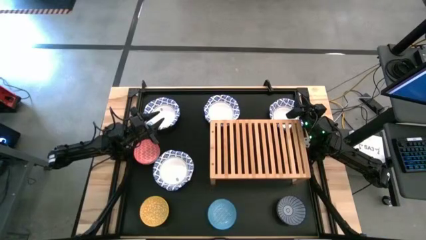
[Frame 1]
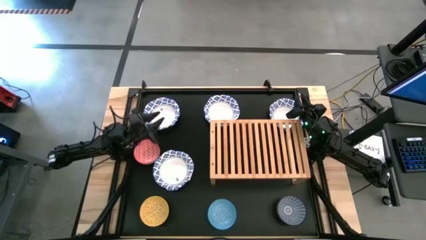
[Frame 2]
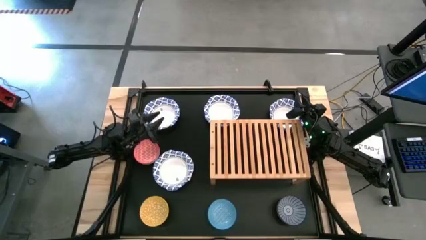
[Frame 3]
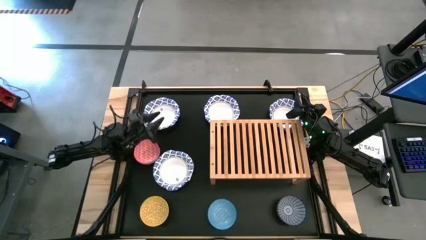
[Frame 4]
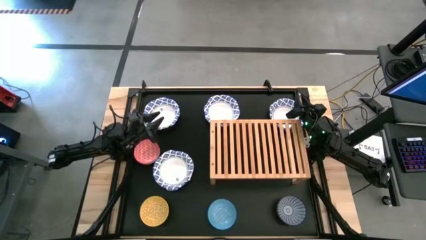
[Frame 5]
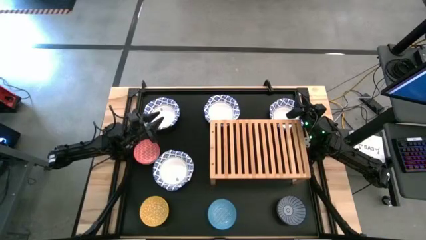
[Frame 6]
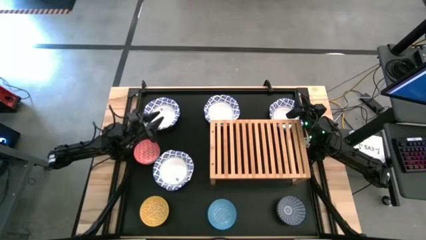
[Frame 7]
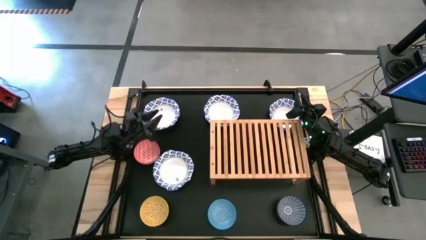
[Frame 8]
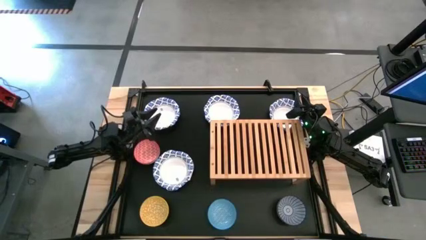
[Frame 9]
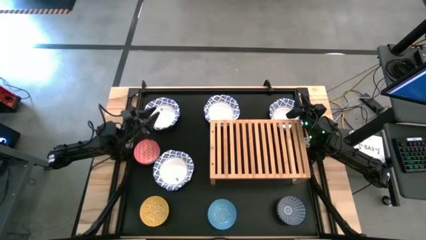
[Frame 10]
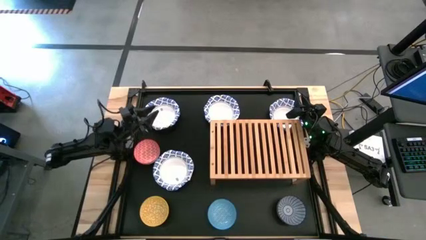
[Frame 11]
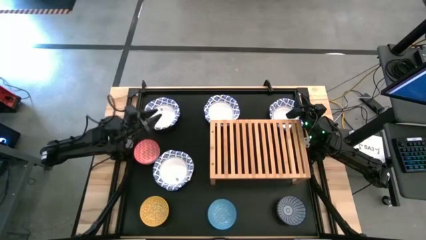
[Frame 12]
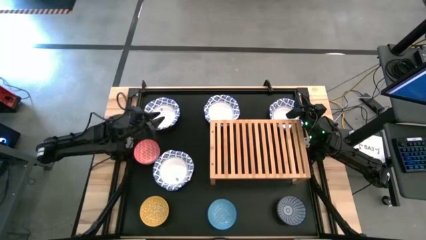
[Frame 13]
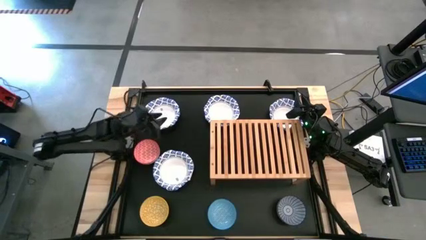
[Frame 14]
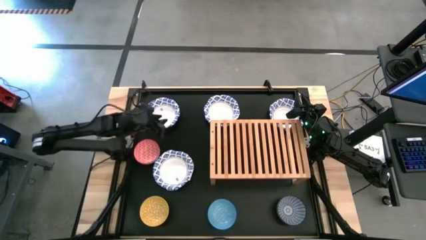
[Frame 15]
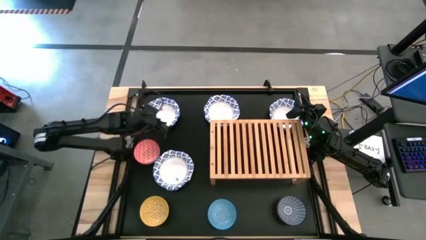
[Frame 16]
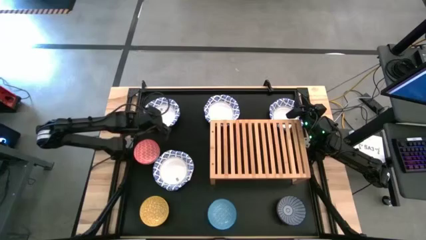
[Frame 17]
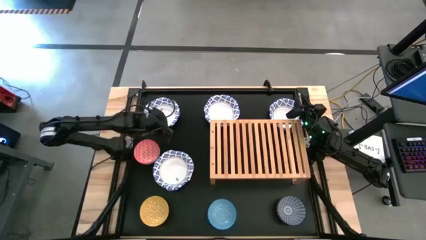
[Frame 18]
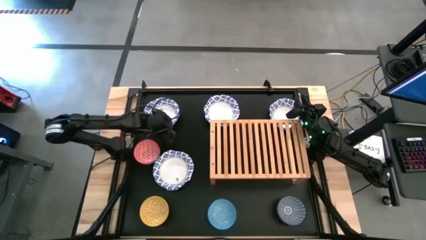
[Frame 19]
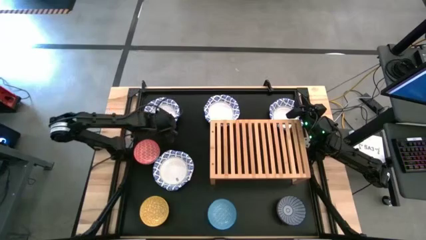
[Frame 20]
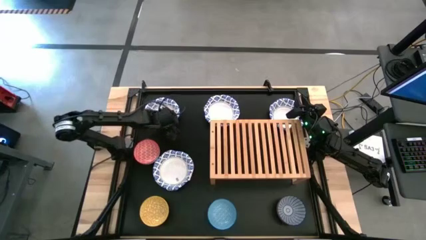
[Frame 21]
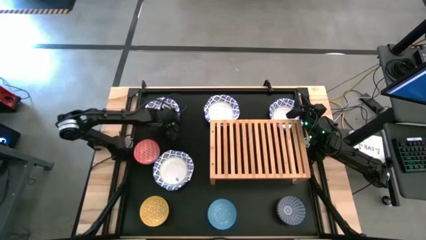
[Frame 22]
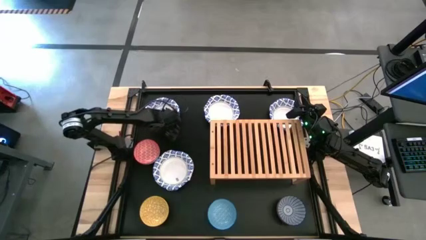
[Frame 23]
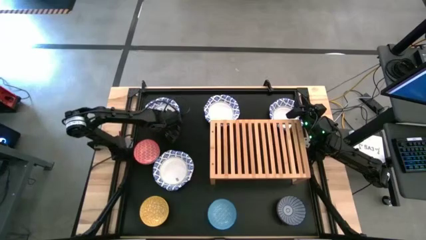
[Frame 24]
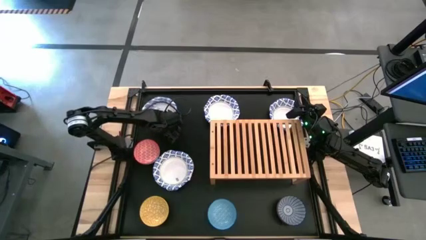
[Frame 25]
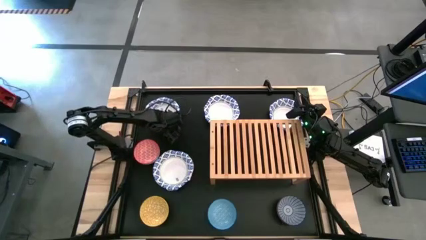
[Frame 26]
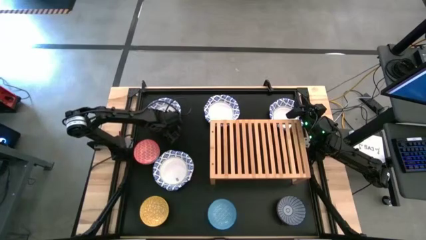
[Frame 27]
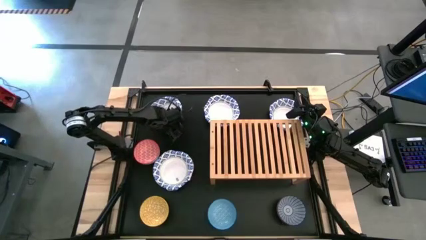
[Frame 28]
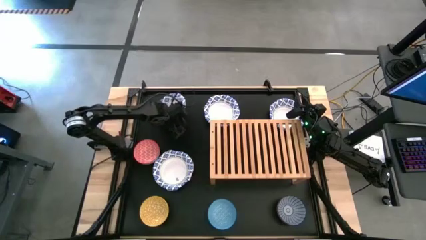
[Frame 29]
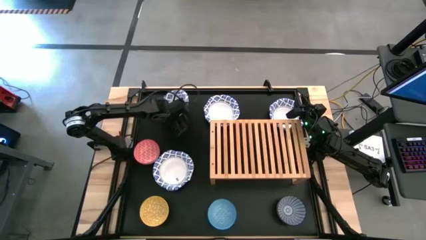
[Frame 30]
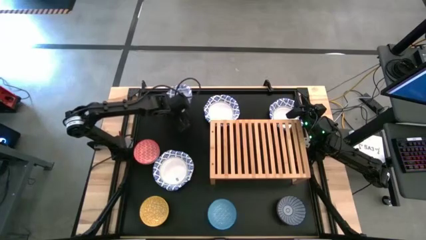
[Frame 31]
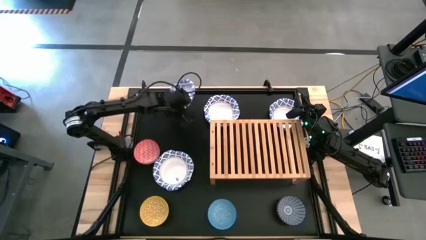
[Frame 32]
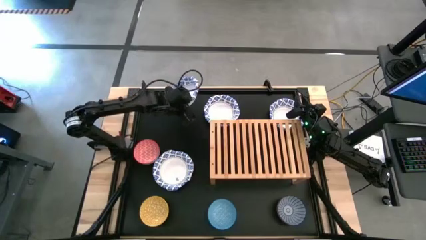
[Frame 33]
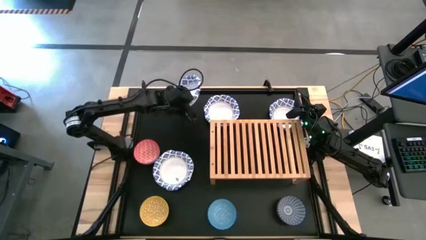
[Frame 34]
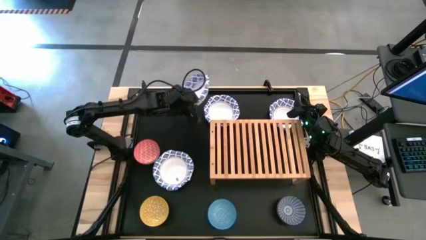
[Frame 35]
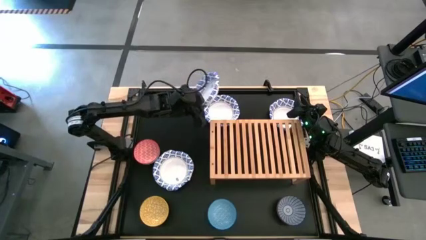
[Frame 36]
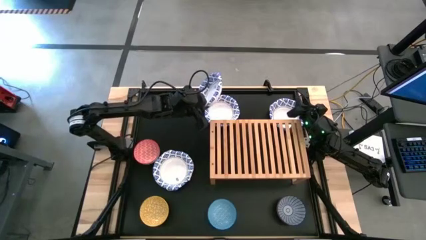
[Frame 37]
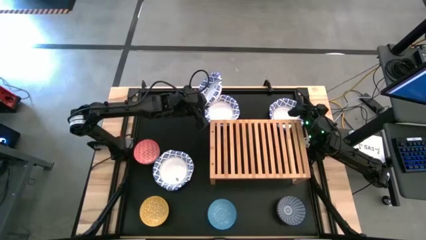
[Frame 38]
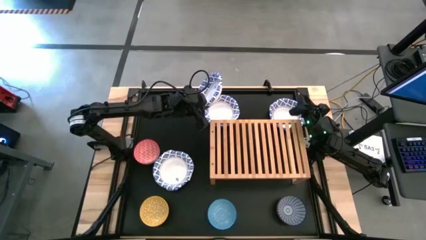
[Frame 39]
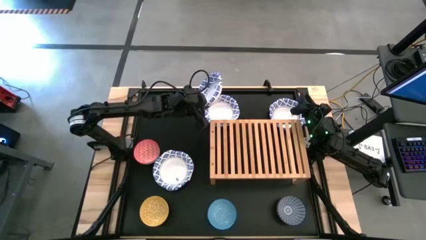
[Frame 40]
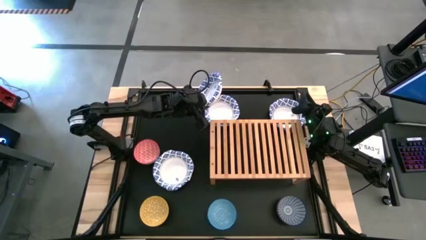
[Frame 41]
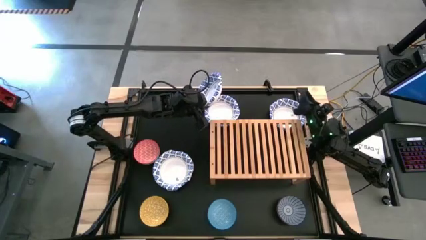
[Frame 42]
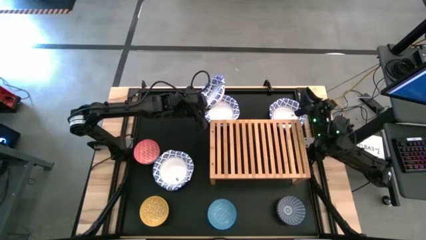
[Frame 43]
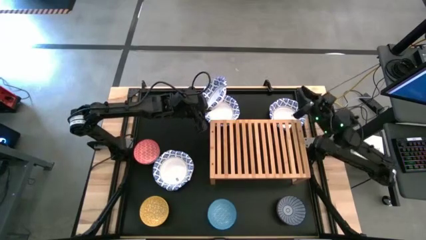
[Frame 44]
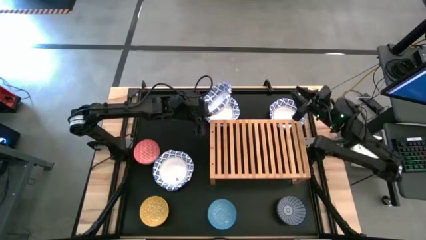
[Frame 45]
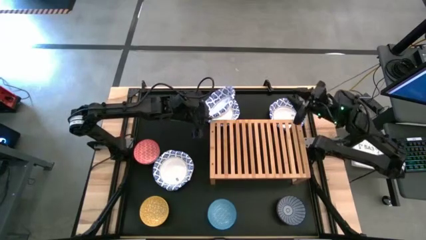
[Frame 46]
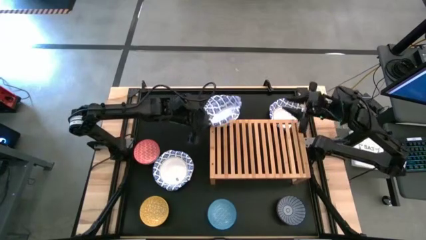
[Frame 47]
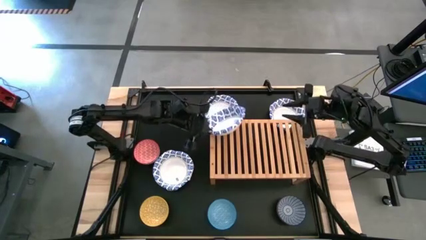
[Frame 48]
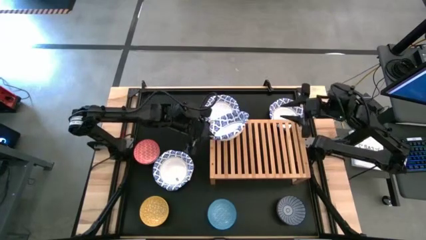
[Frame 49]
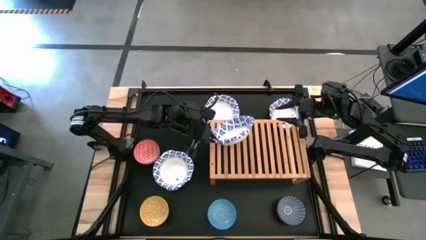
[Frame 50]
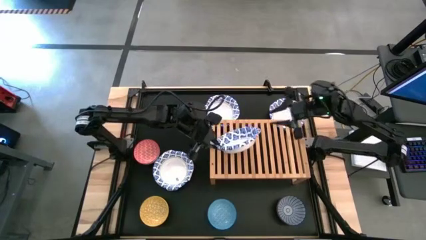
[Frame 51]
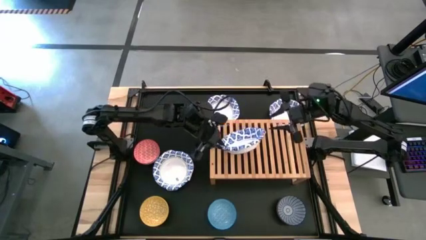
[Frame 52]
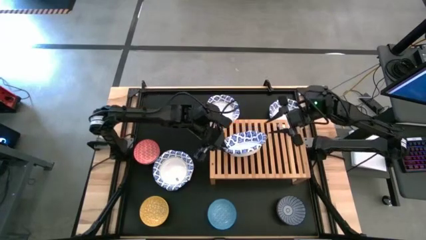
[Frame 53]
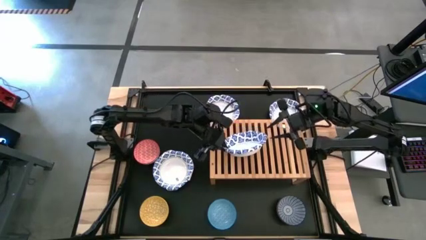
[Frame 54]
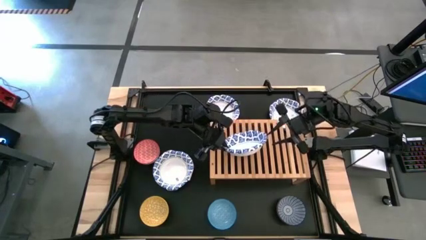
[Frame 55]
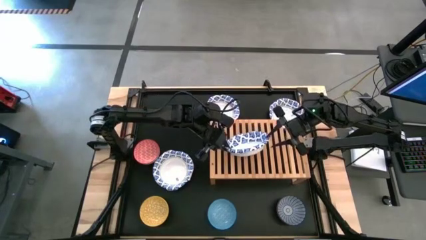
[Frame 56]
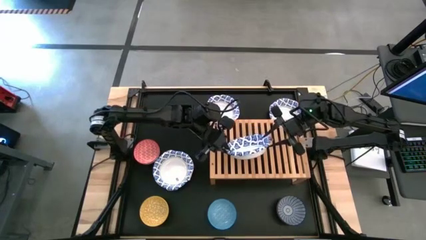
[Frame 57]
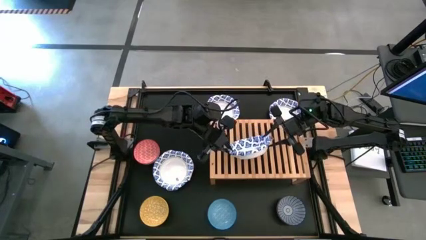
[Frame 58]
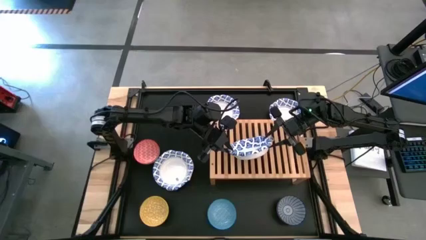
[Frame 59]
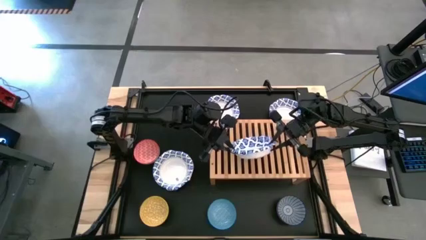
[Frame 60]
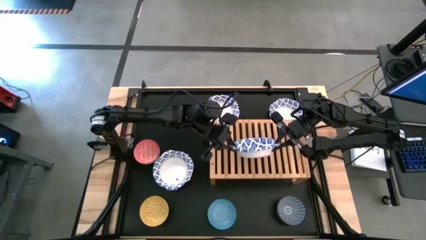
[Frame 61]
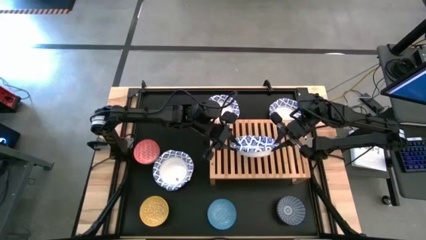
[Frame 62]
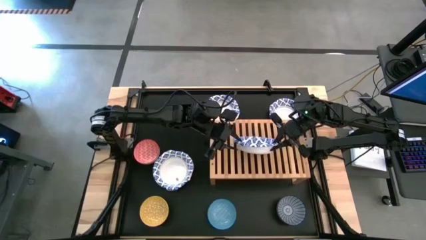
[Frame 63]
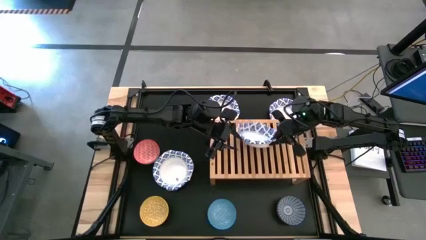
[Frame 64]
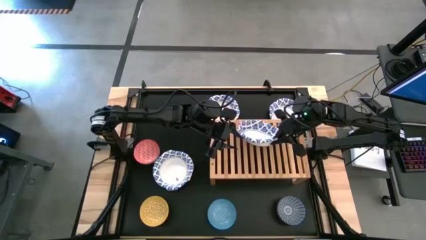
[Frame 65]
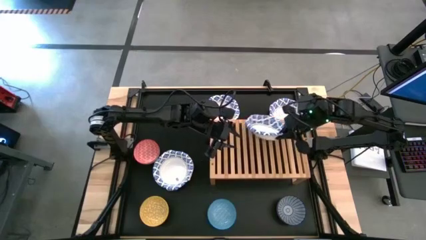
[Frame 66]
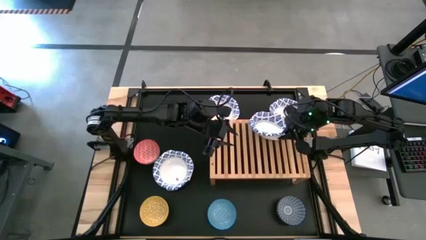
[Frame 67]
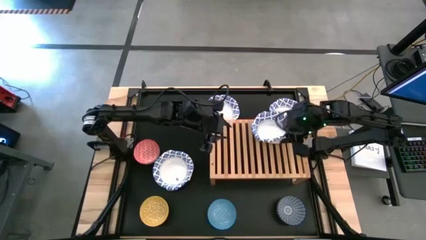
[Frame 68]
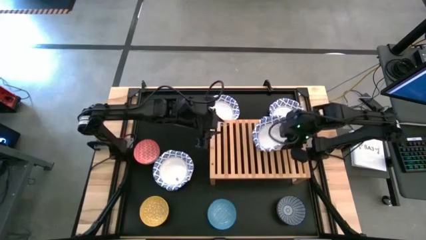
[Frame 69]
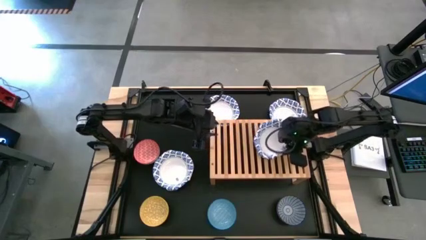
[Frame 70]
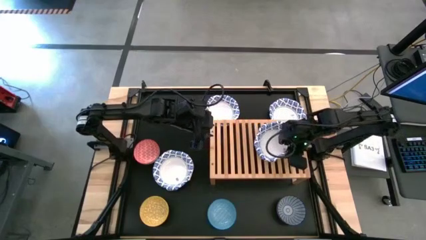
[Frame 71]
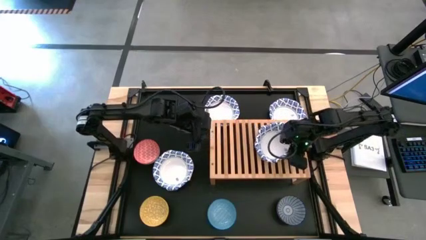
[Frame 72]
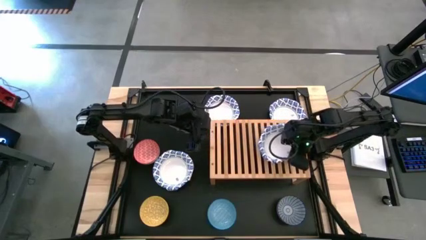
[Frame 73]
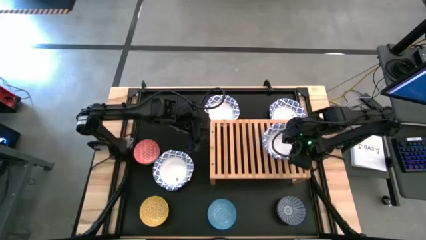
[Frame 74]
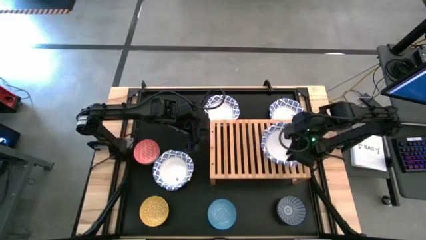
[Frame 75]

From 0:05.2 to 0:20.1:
Task: Place and stack bowls onto a shelf
Put the top left big white and blue bowl on the shelf
